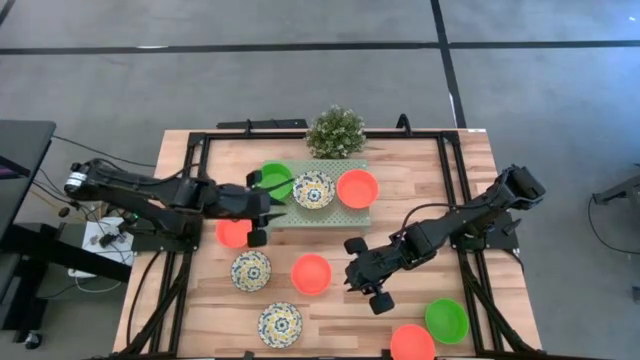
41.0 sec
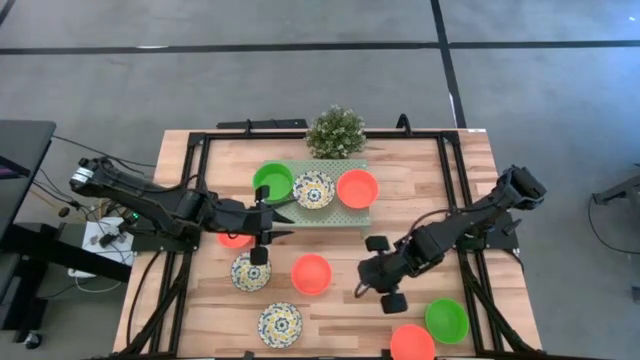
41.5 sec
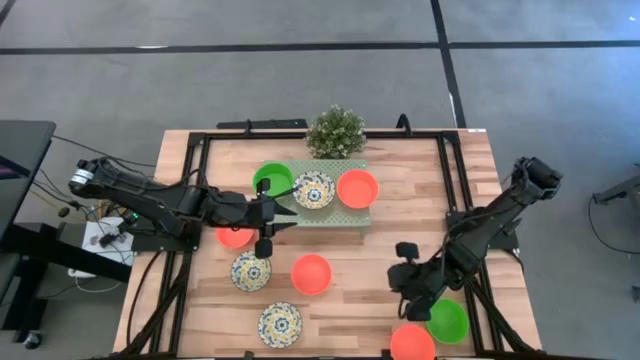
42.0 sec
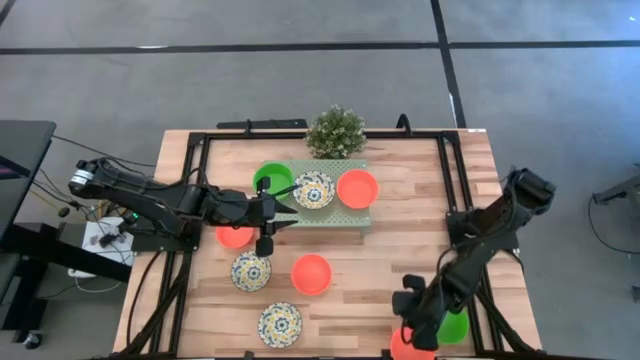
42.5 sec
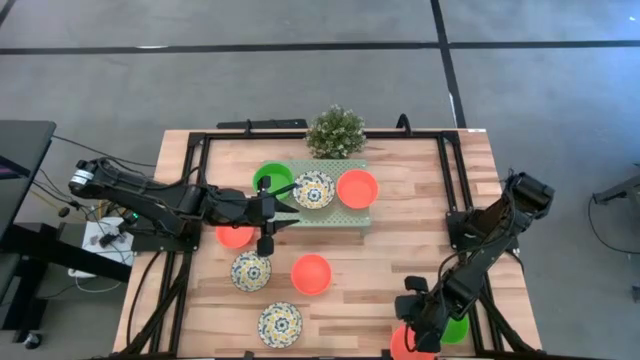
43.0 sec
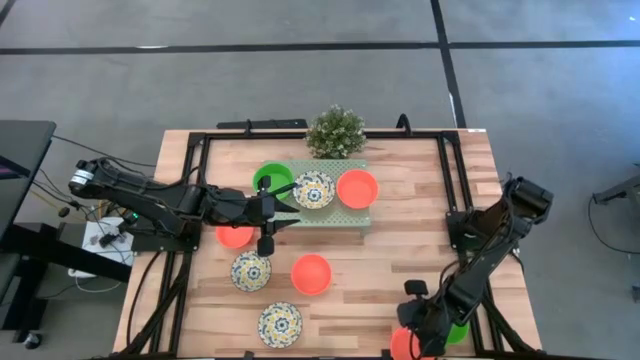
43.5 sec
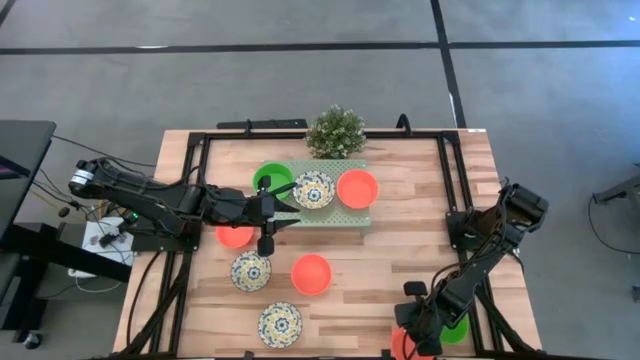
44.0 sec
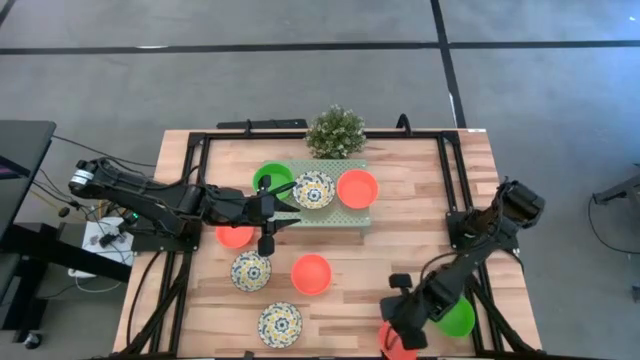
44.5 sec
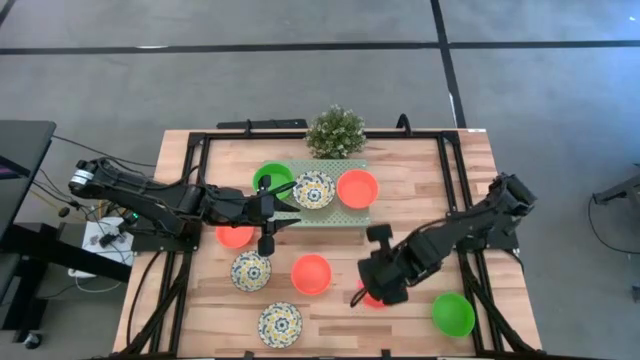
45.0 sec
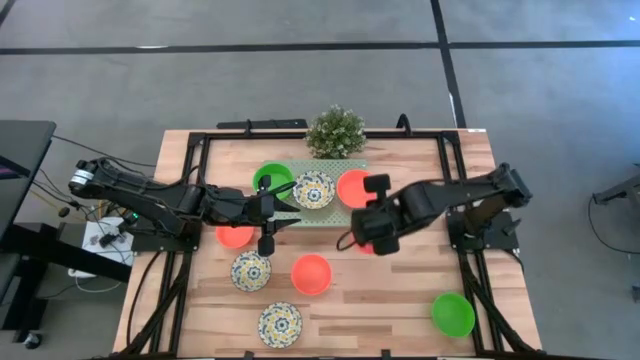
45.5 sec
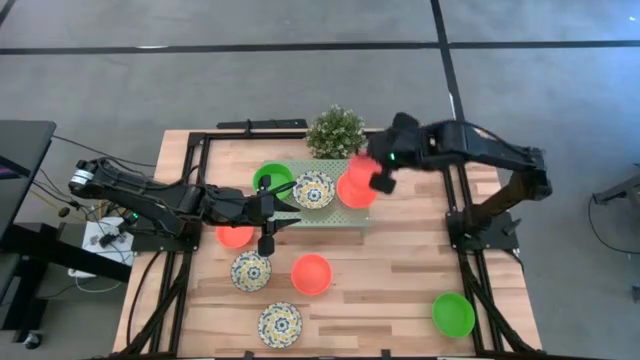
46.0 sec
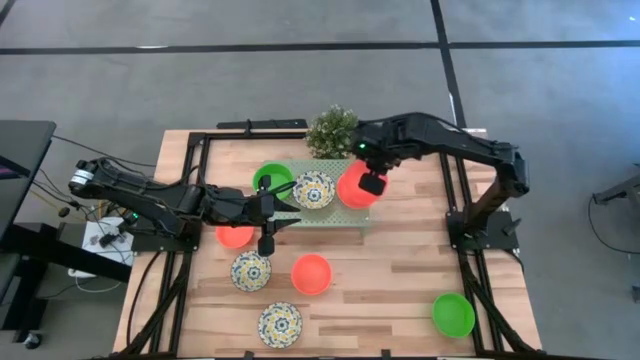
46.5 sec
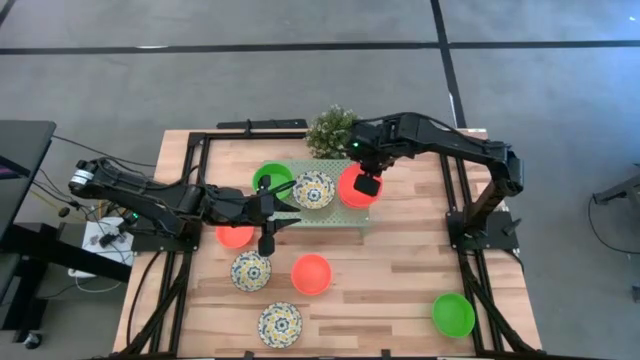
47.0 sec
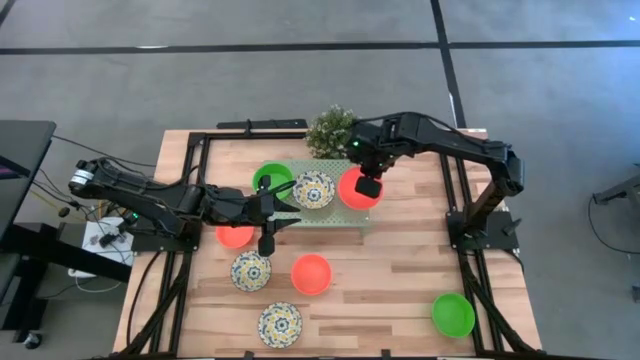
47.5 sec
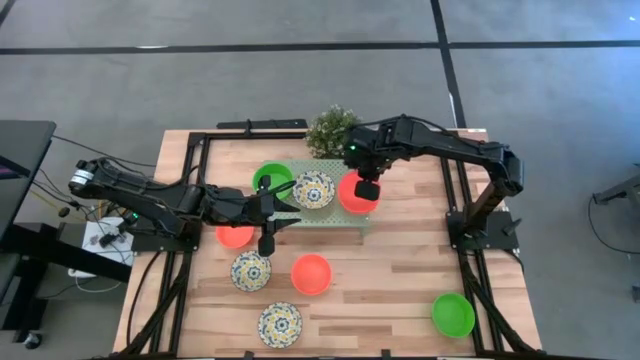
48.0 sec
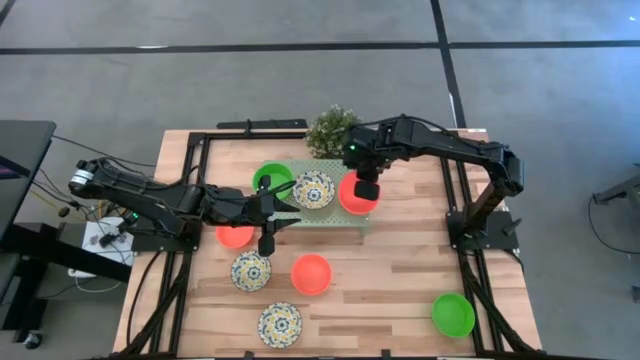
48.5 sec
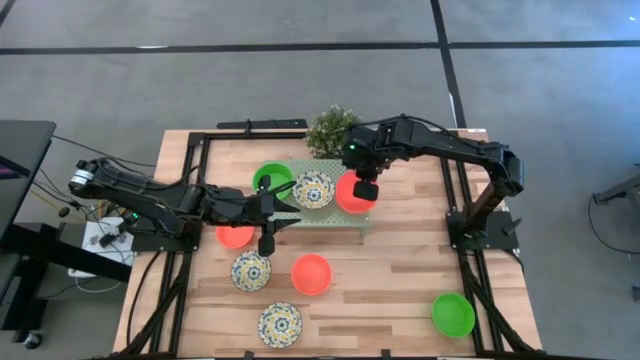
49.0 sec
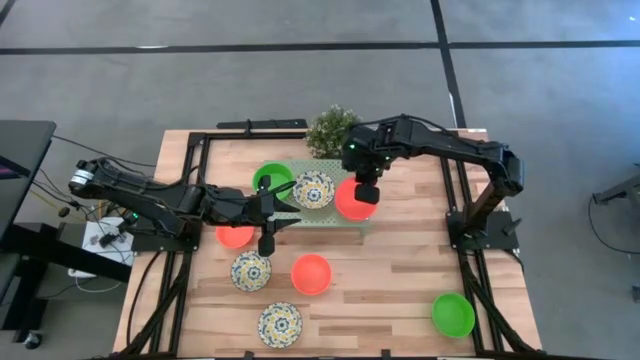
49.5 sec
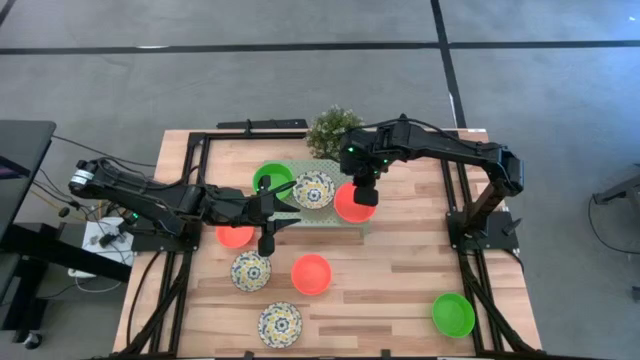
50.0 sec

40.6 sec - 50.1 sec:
Task: Pick & Place Mini bowls
Stack the orange bowl on the orange bowl on the shelf

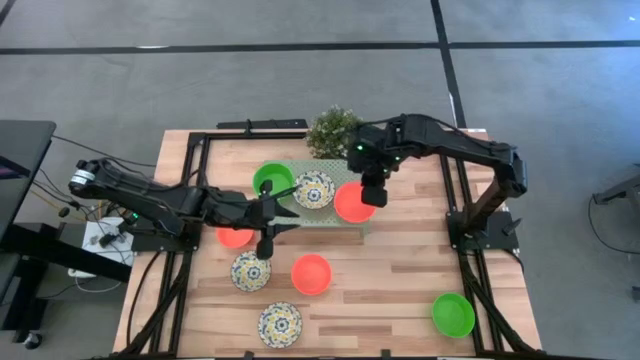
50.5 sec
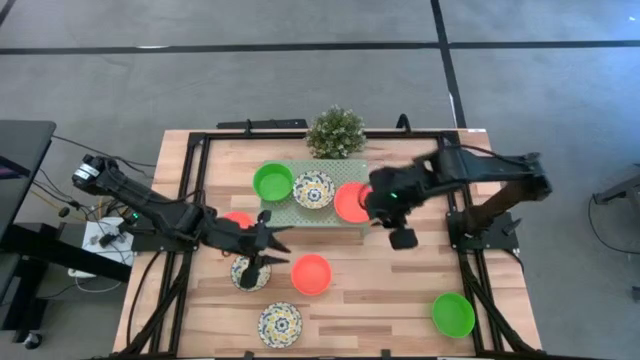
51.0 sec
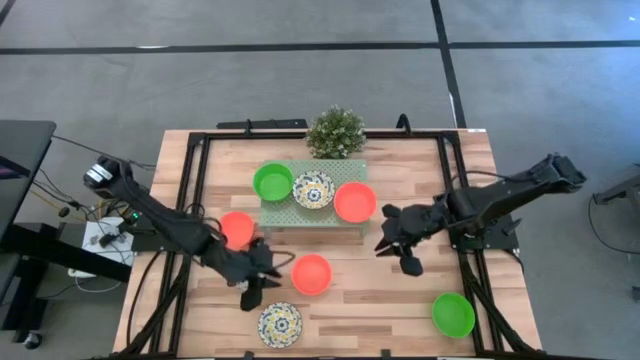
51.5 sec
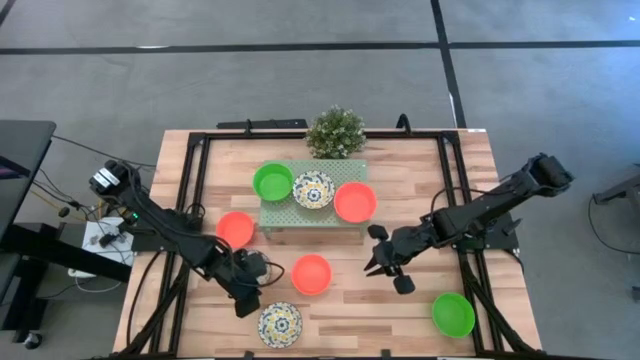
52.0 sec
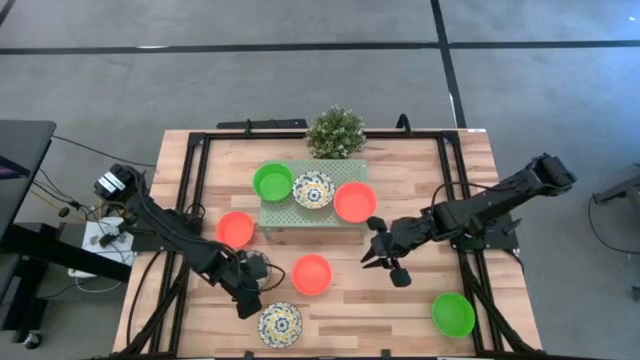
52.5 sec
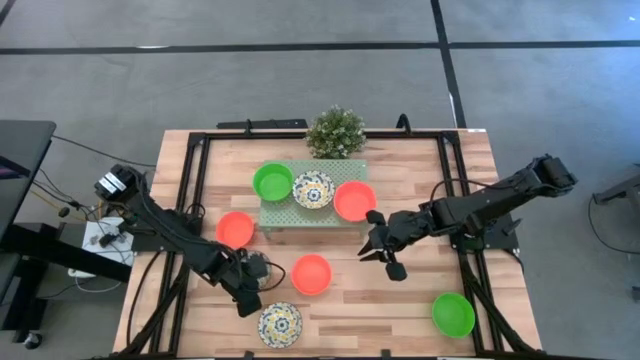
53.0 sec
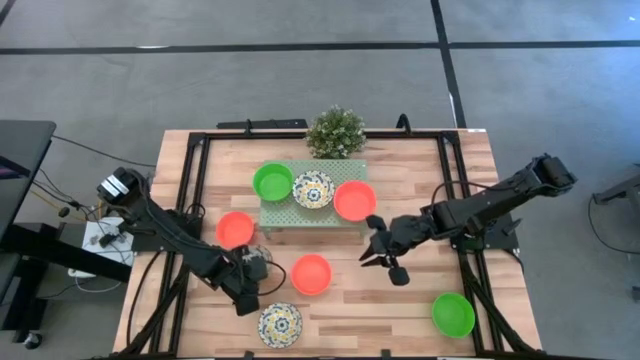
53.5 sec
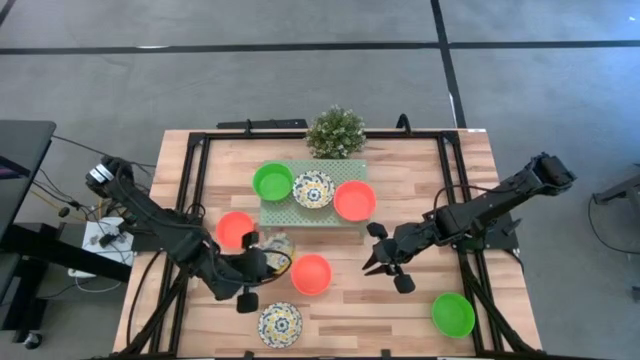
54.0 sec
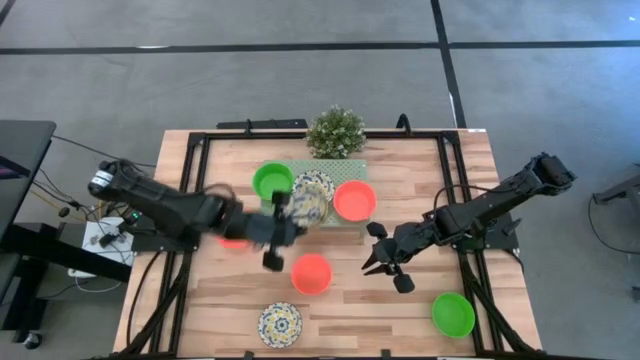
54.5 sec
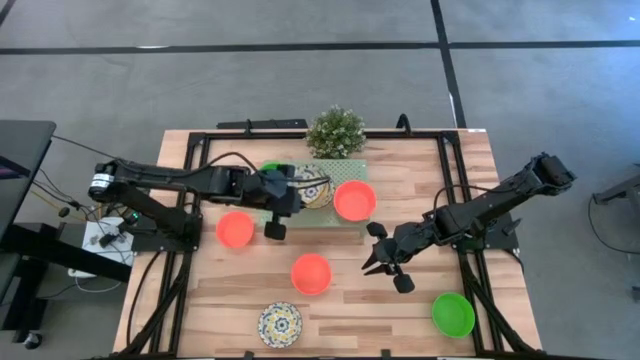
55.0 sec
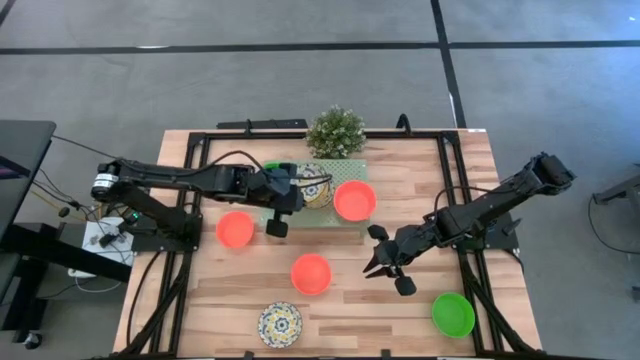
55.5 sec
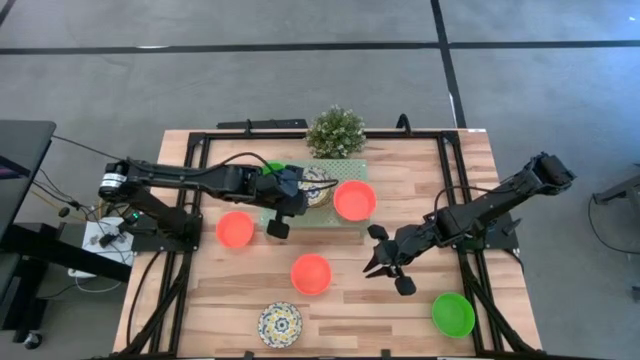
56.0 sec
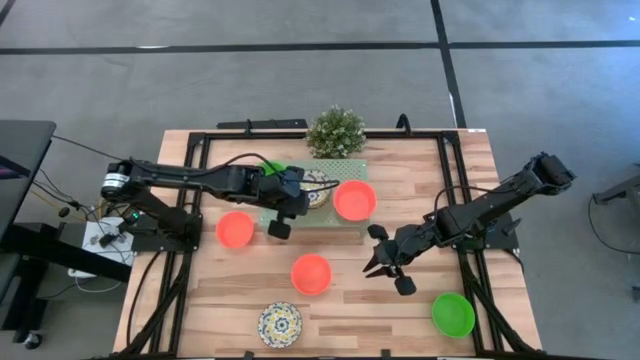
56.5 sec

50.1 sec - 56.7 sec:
Stack the yellow patterned bowl on the yellow patterned bowl on the shelf

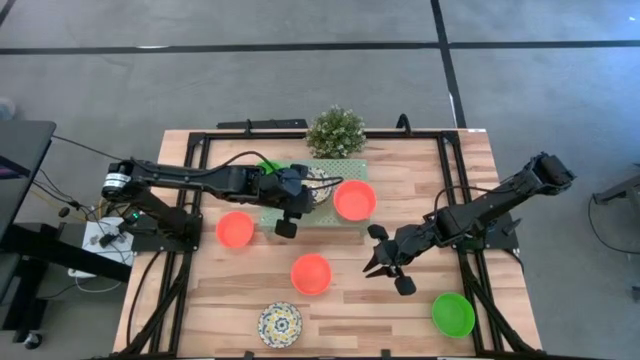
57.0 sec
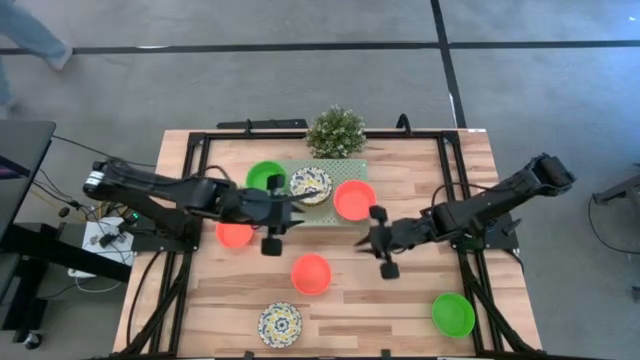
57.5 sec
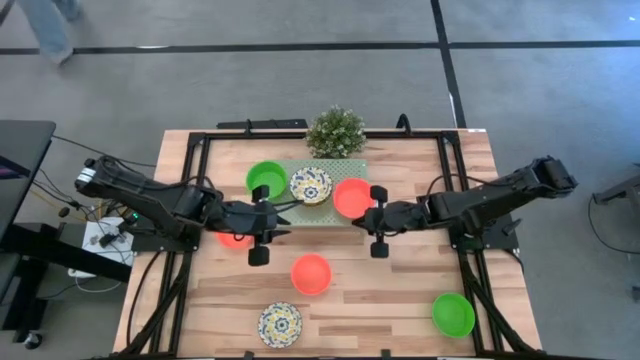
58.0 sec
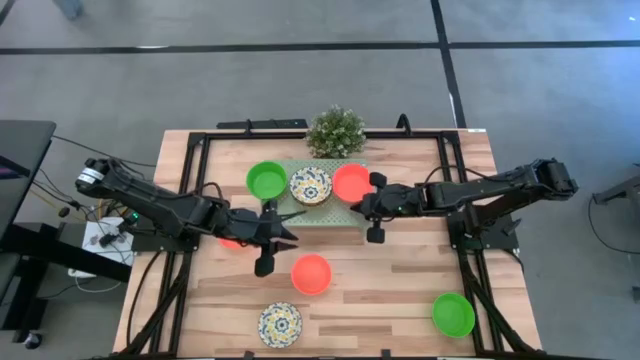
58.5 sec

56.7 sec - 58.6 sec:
Adjust the orange stacked bowls on the shelf

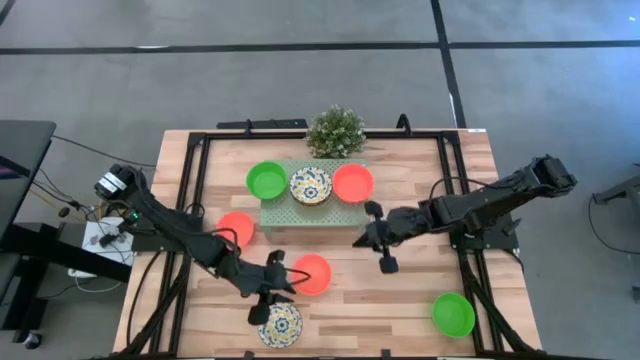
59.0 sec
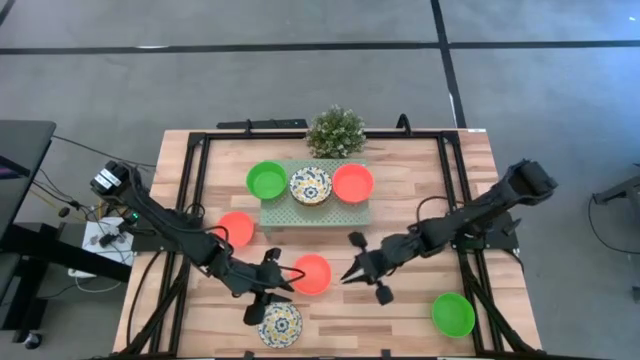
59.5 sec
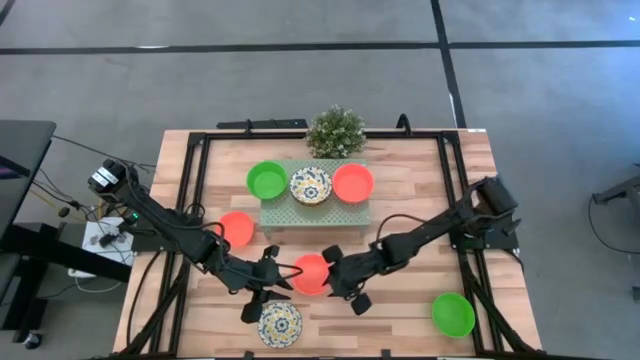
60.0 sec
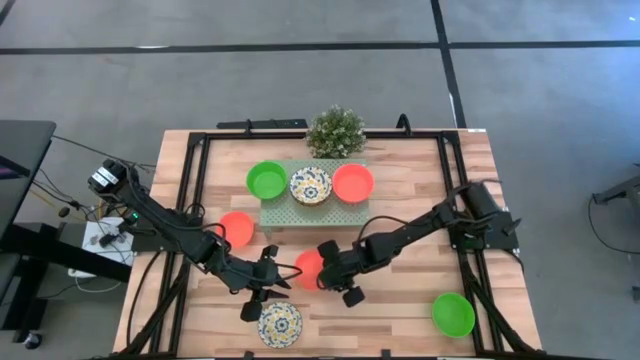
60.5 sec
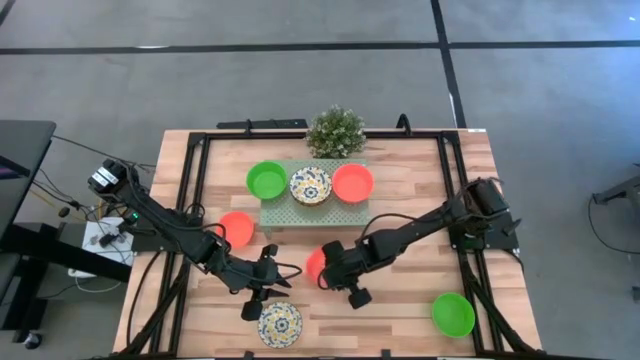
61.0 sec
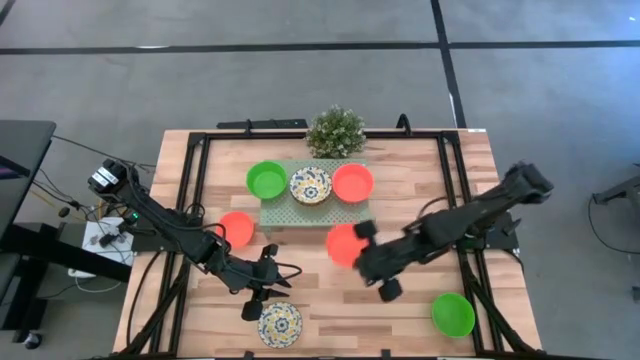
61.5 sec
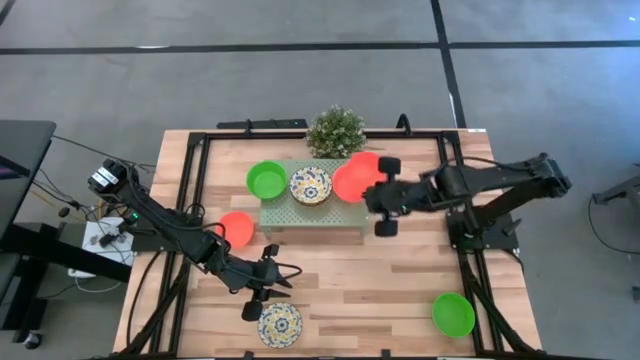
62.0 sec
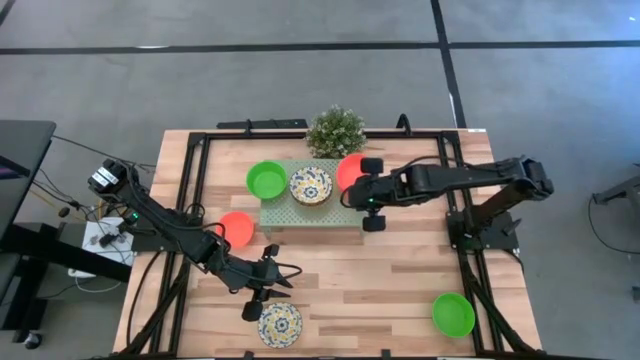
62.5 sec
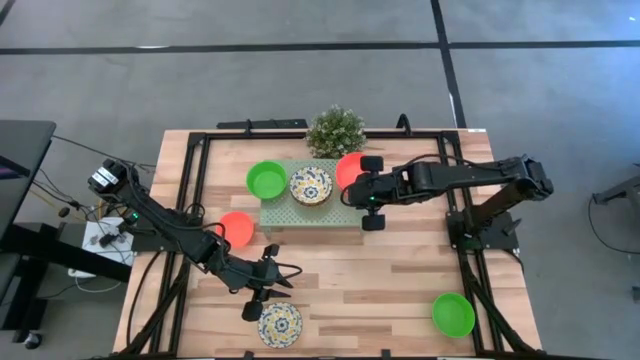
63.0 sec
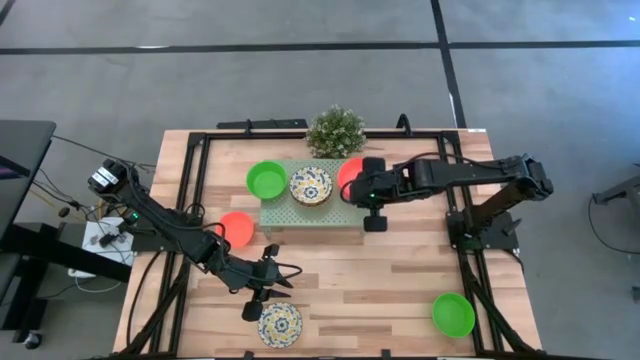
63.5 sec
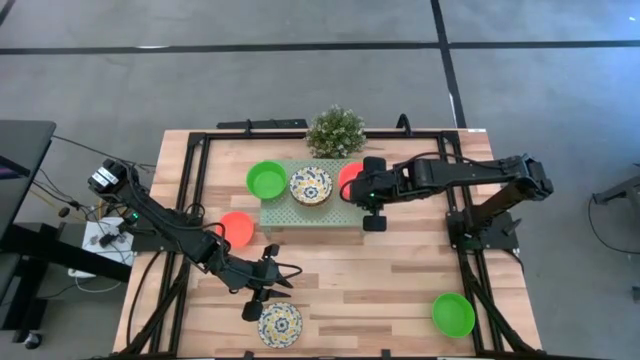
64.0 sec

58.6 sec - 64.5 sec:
Stack the orange bowl on the orange bowl on the shelf
